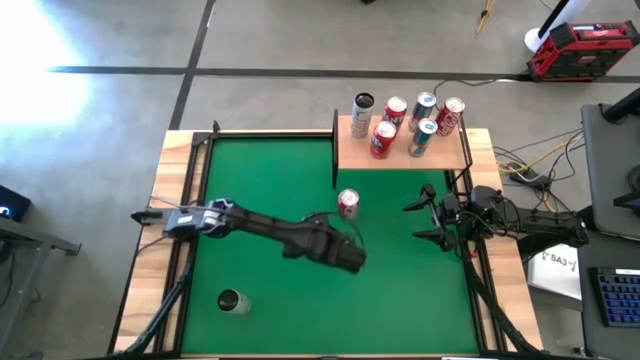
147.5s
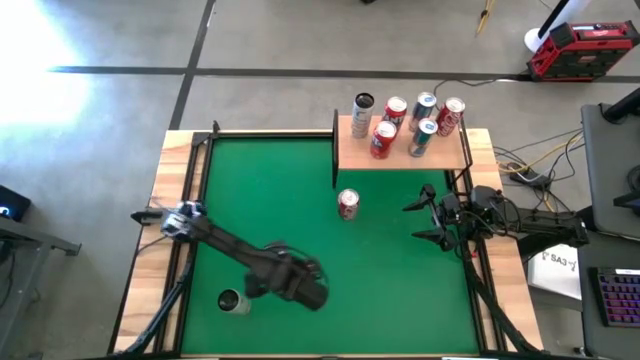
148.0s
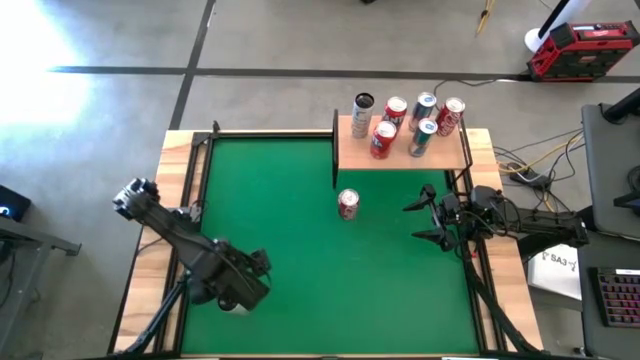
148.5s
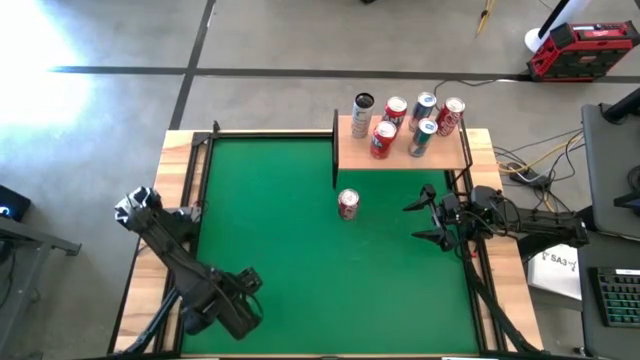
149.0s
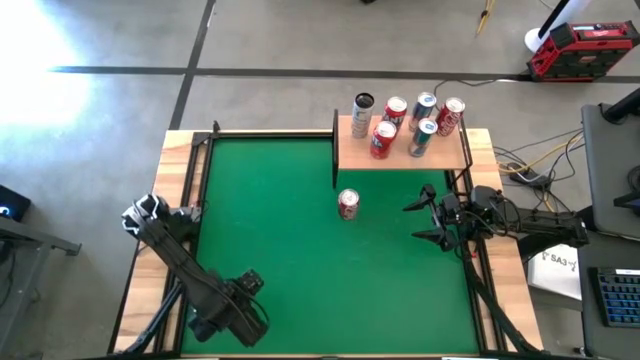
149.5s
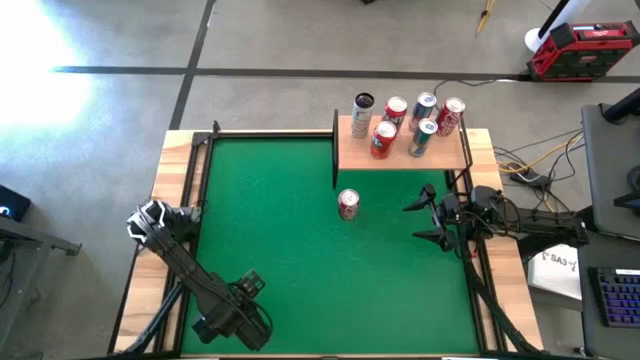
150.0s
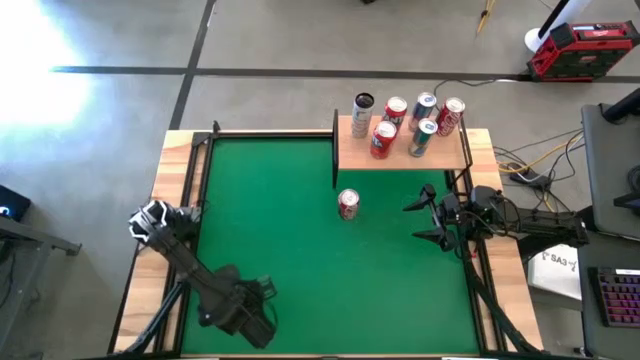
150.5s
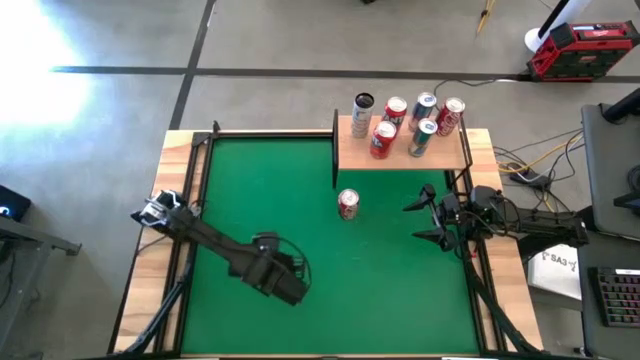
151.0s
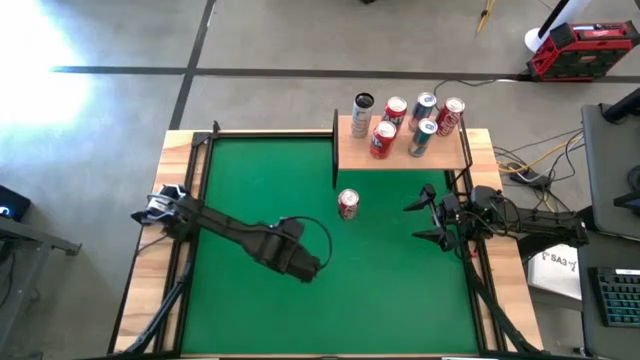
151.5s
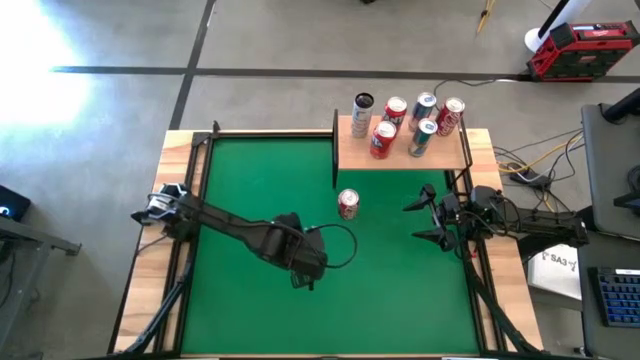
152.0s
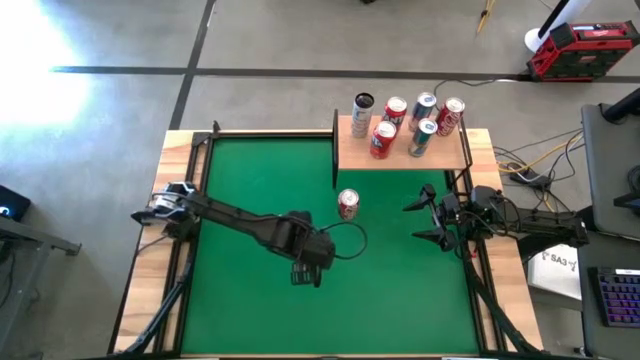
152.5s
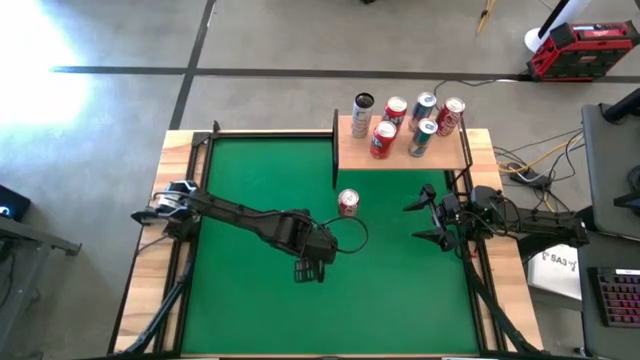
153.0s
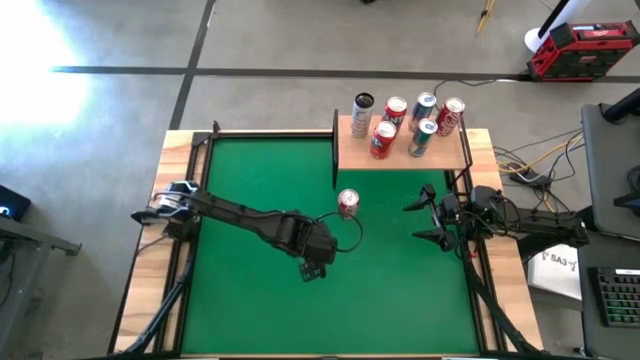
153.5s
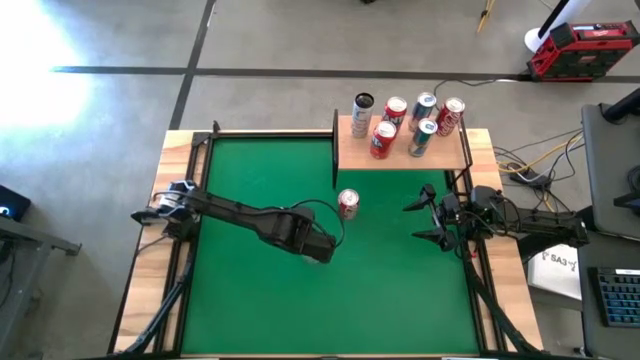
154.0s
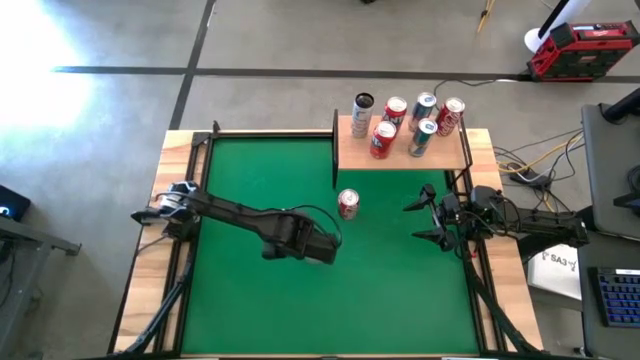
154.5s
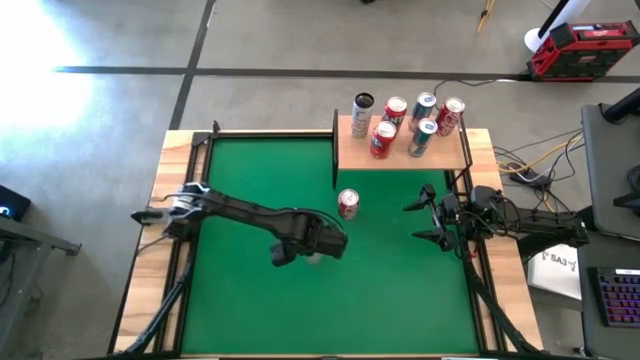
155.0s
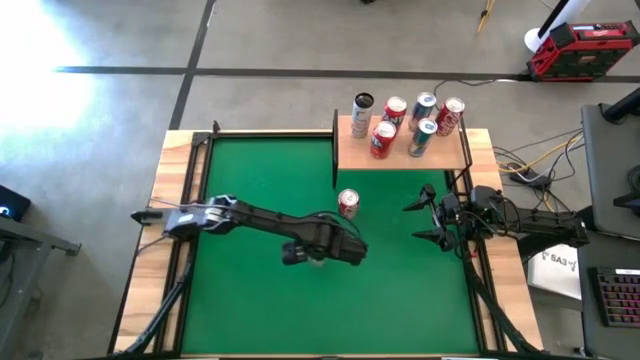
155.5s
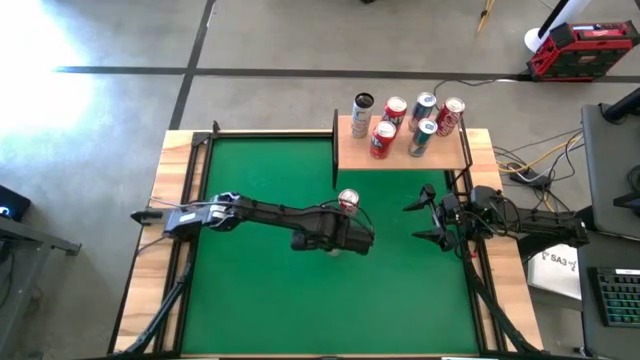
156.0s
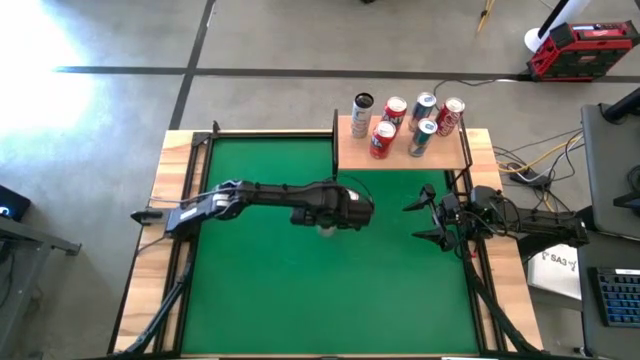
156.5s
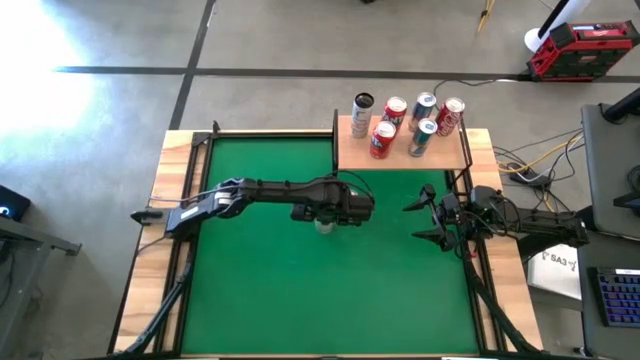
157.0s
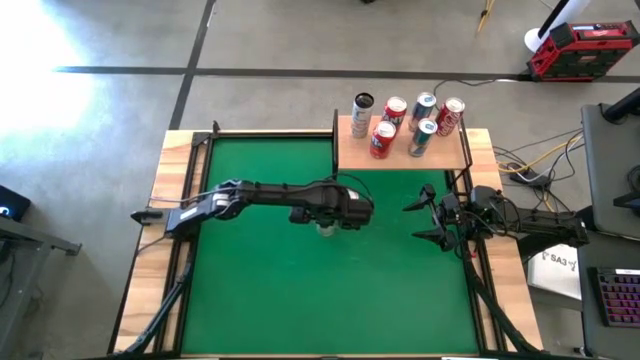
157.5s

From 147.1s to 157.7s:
Task: Place canned beverage on shelf
Move the white-yellow soda can to the center of the table

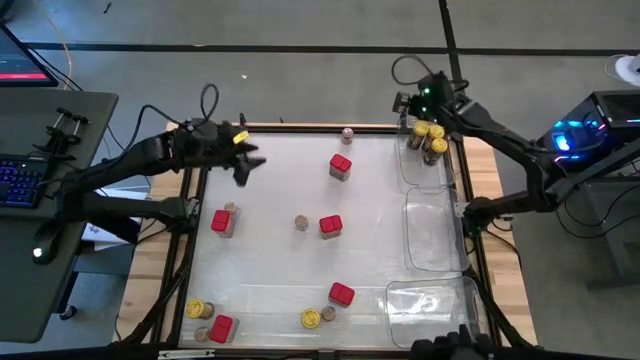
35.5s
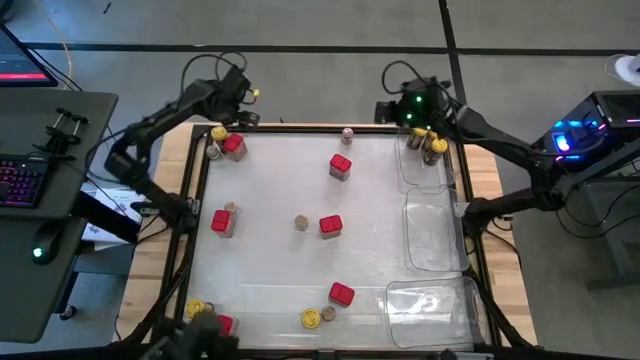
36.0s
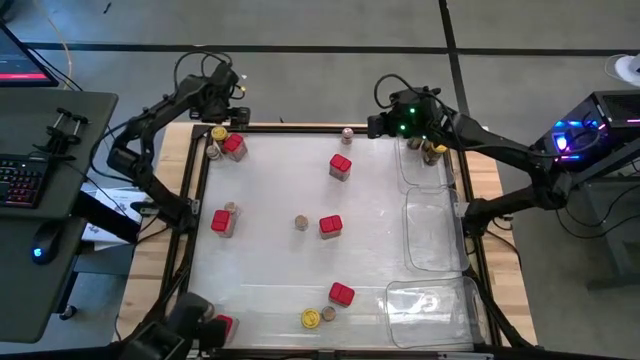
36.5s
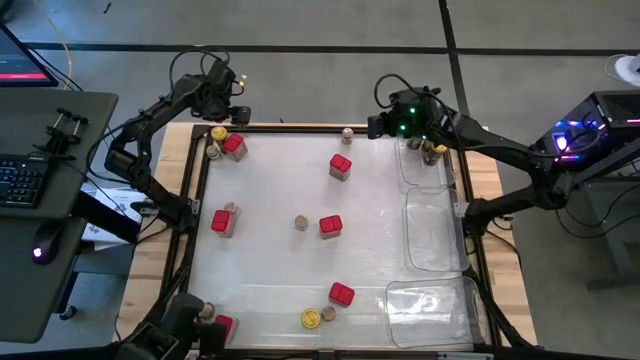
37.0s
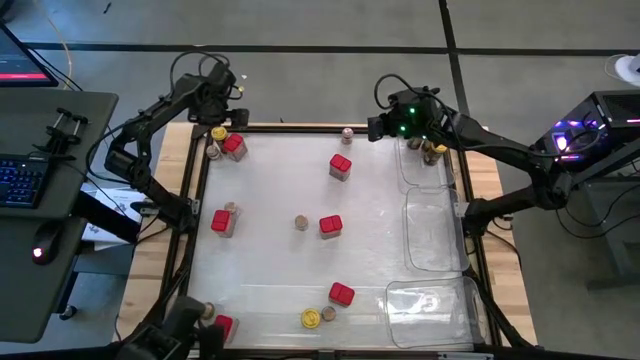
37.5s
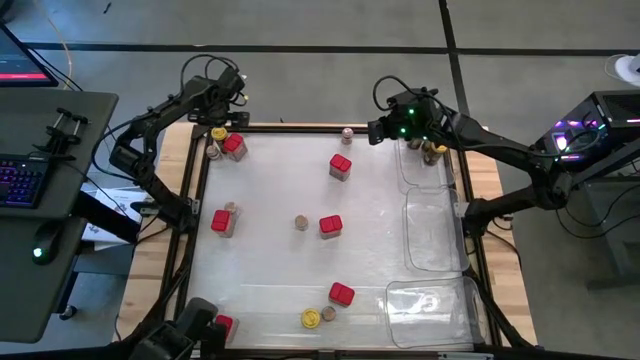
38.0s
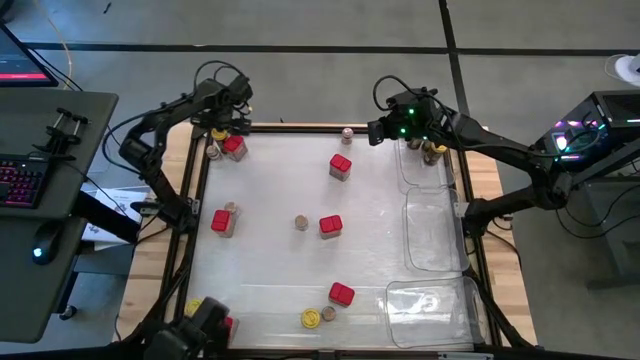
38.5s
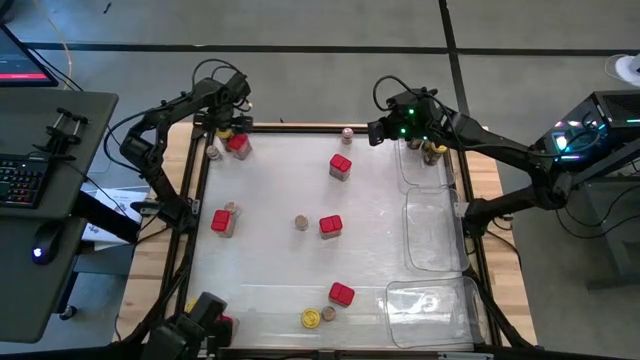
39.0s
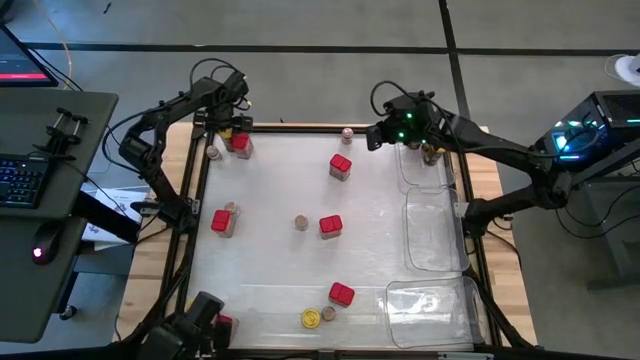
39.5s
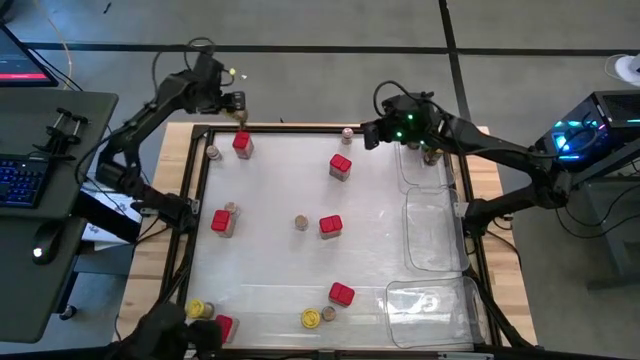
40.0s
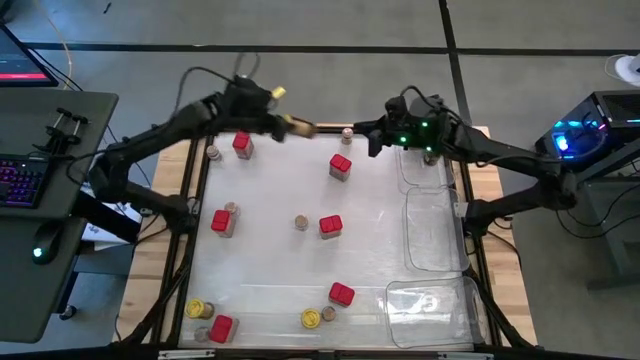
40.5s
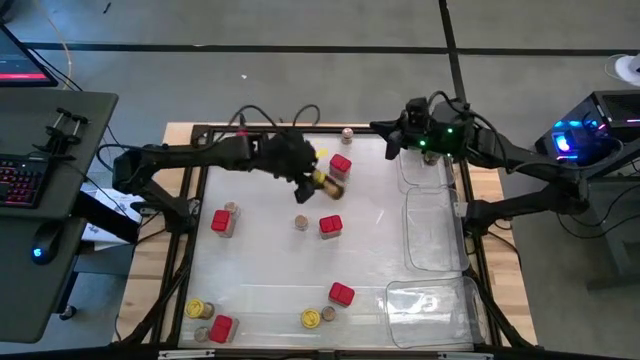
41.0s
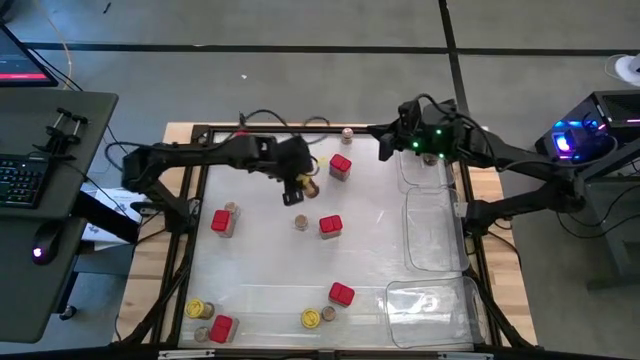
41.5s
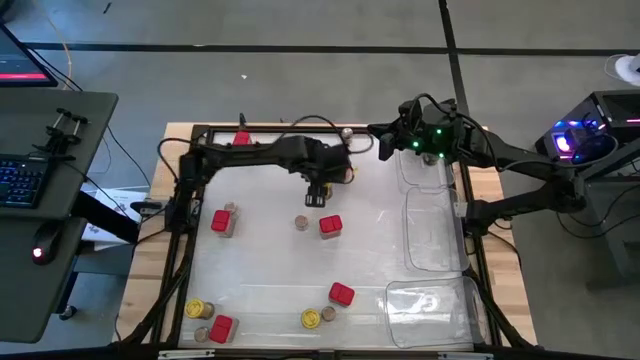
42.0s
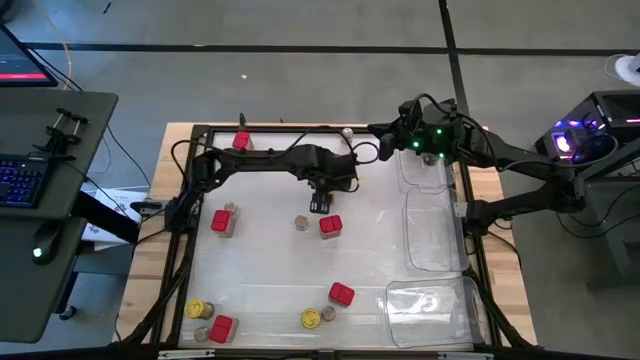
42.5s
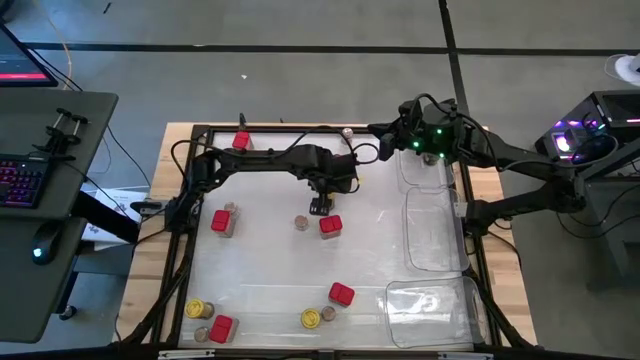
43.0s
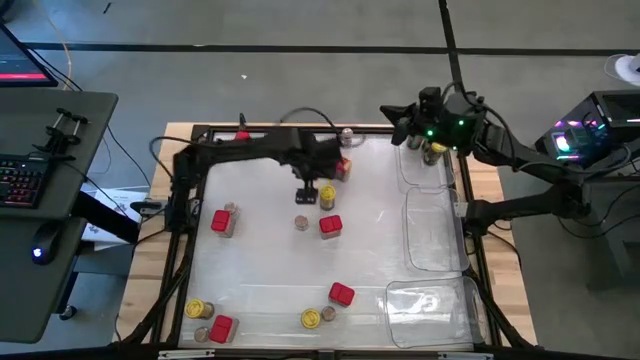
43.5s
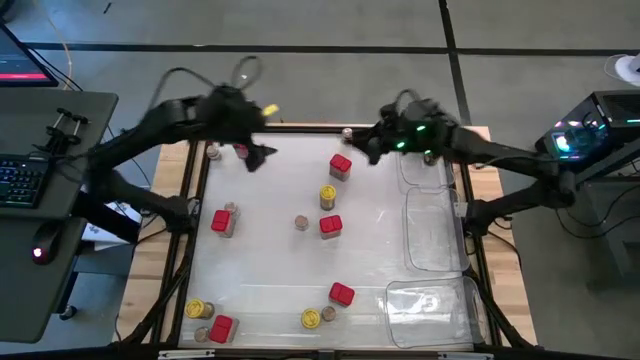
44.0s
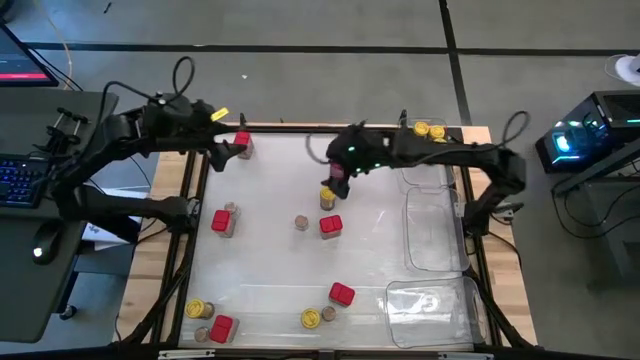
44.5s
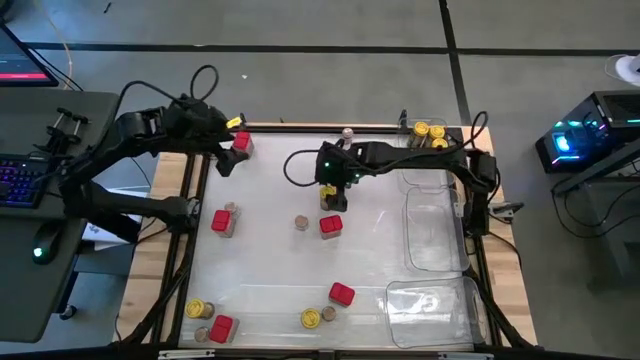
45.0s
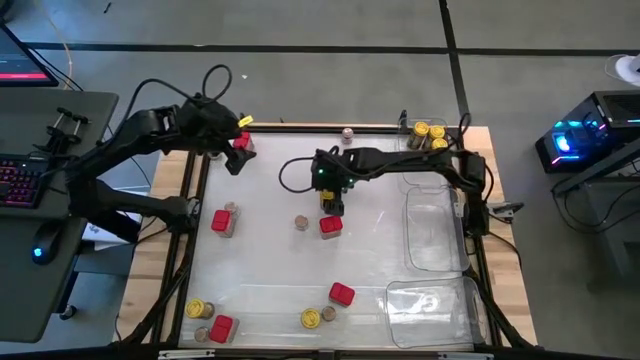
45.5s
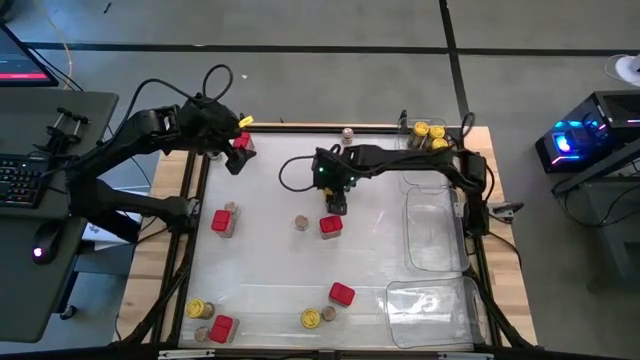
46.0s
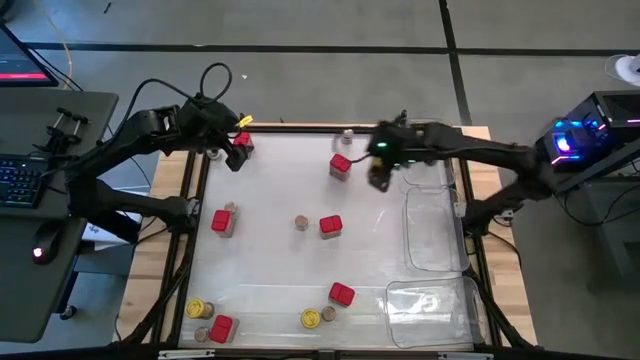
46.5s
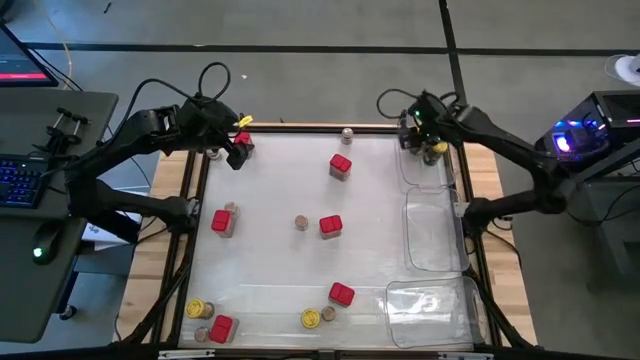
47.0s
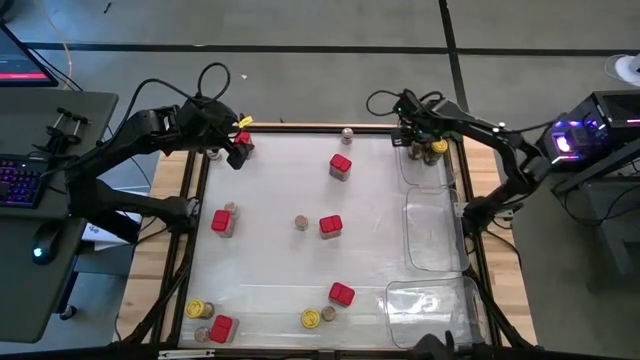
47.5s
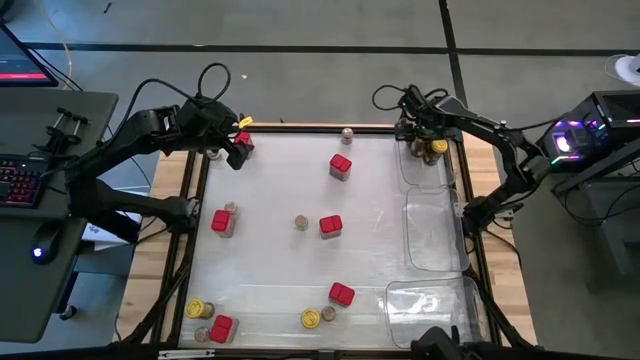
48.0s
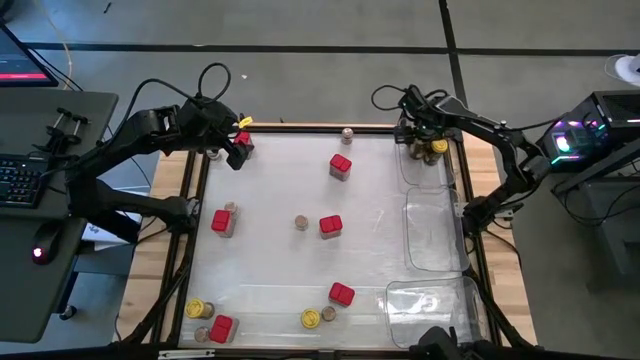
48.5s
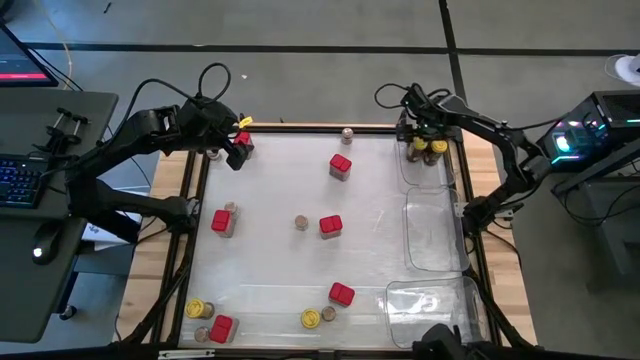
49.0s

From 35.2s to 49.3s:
Task: Sort spices by type
Put the yellow seasoning bottle into the top transparent bin
